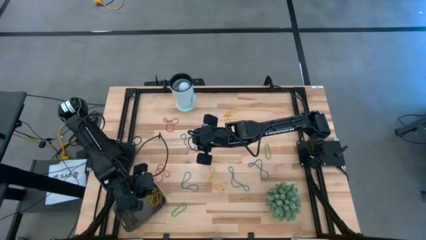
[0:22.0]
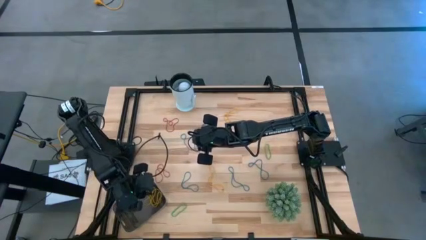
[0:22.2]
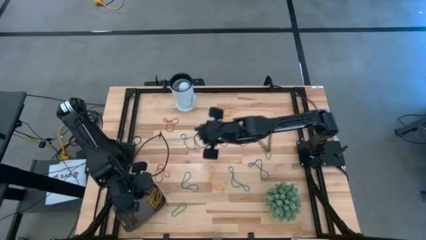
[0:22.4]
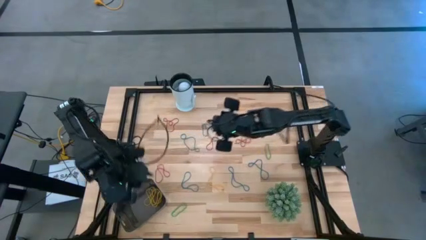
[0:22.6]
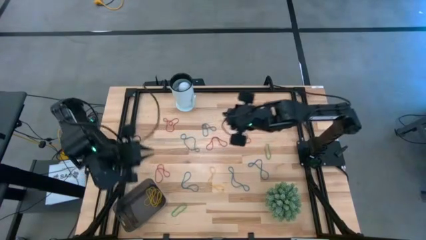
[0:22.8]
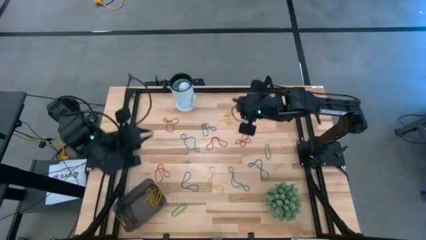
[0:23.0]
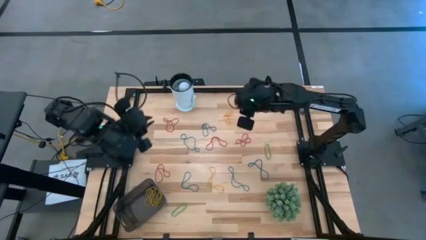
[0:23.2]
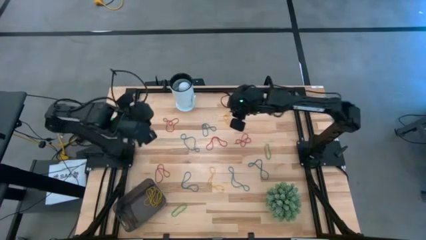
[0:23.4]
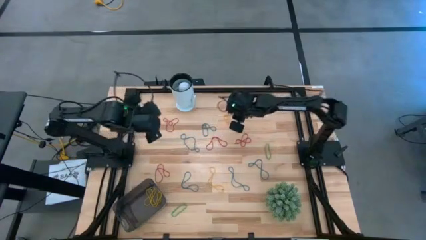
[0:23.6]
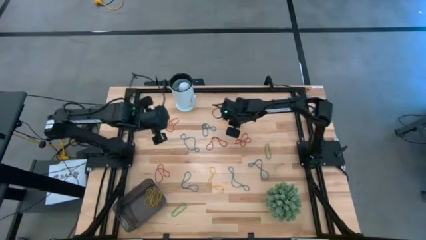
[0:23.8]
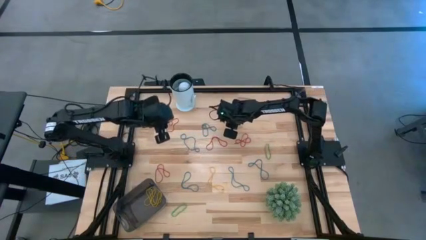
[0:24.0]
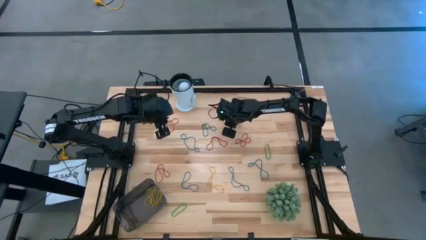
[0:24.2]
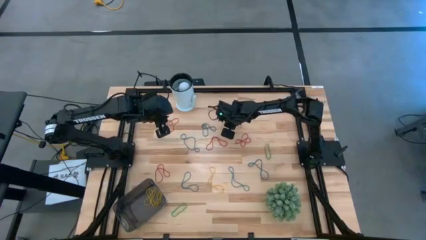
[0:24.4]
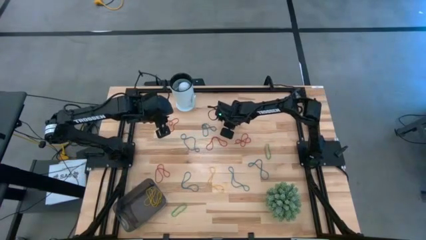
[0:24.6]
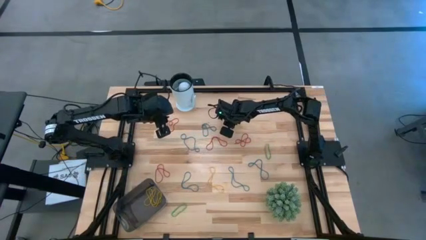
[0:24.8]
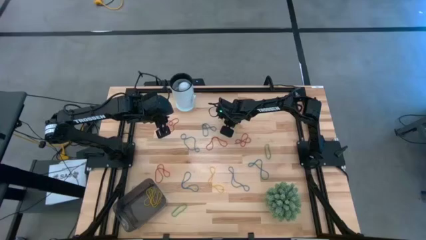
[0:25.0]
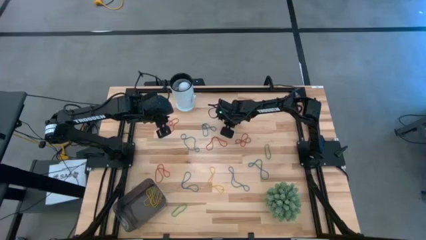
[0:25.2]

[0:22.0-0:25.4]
Task: Pick and place items into bin
Put the yellow rubber band into the black bin

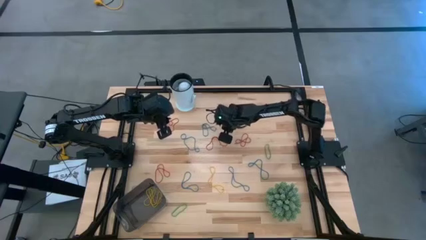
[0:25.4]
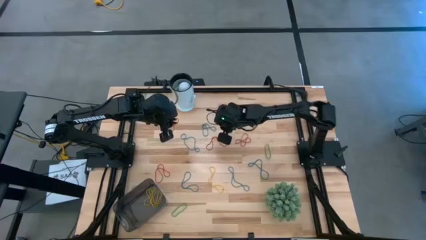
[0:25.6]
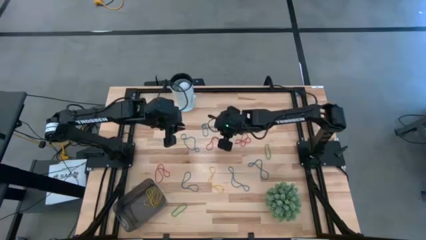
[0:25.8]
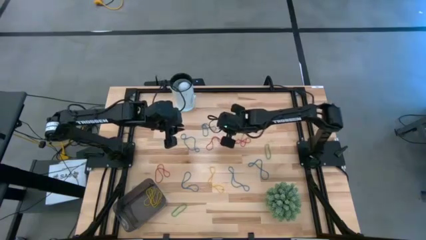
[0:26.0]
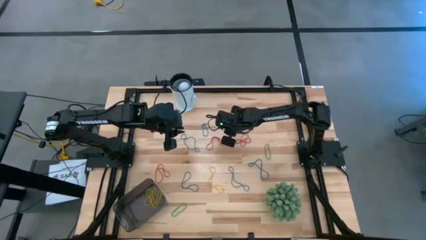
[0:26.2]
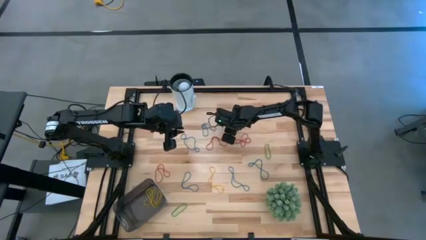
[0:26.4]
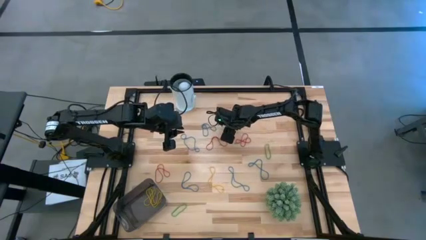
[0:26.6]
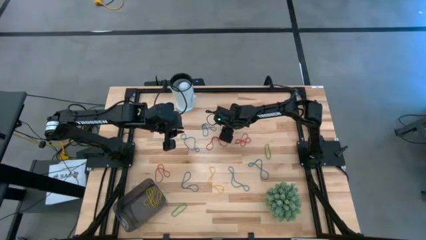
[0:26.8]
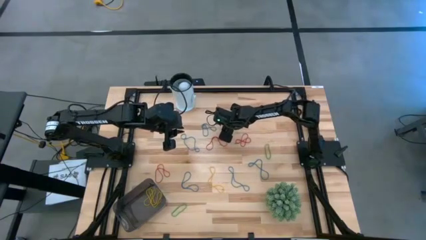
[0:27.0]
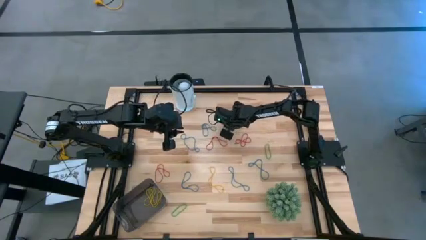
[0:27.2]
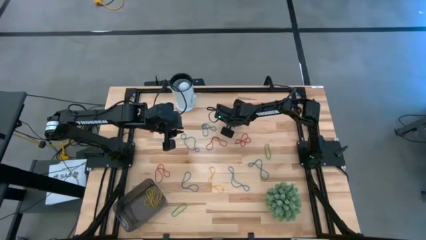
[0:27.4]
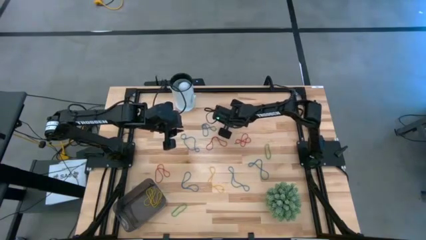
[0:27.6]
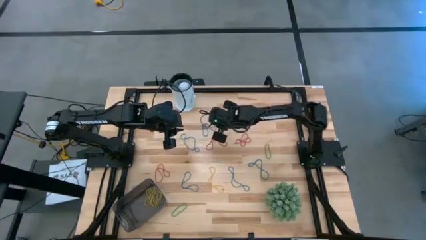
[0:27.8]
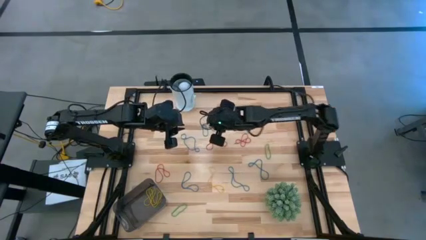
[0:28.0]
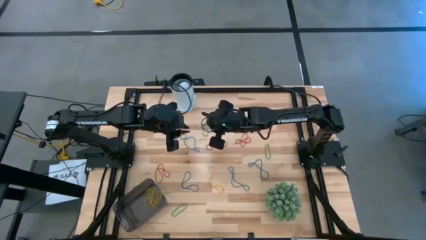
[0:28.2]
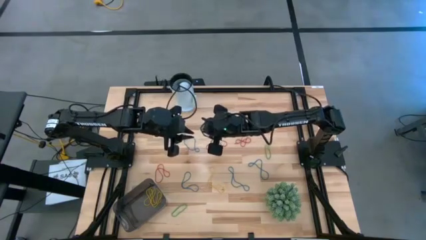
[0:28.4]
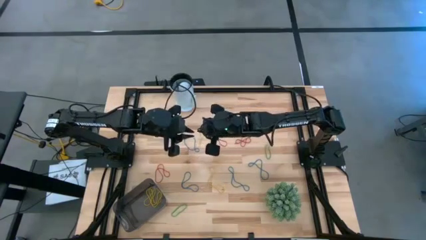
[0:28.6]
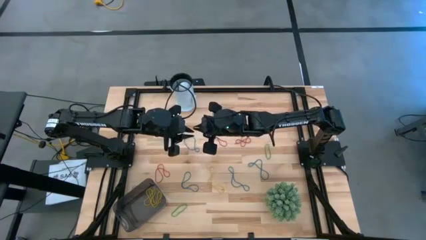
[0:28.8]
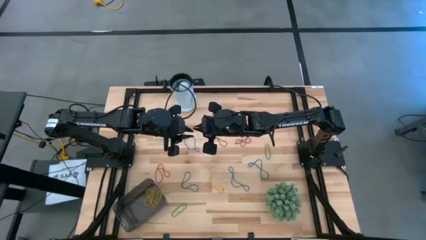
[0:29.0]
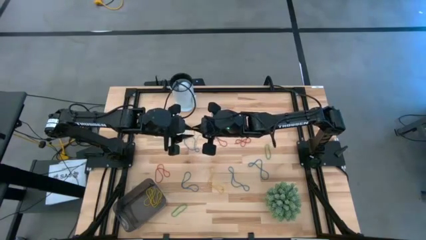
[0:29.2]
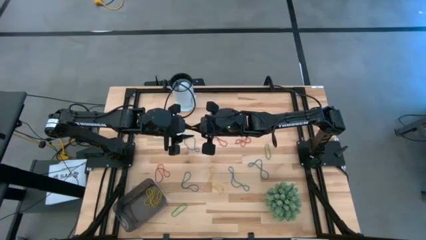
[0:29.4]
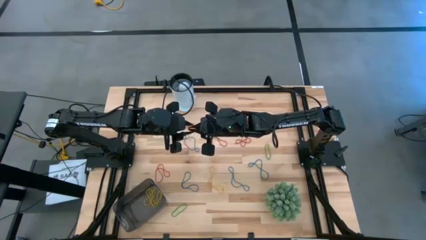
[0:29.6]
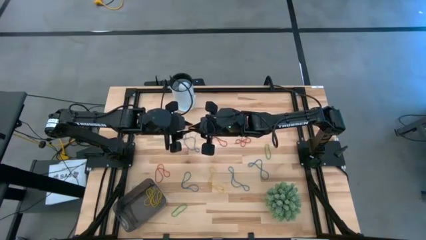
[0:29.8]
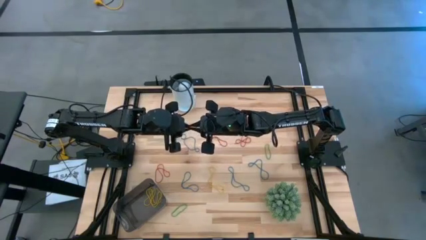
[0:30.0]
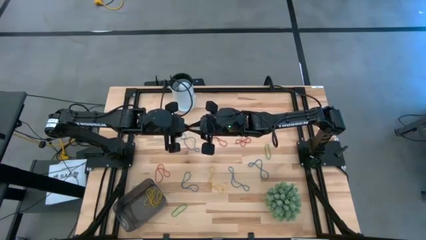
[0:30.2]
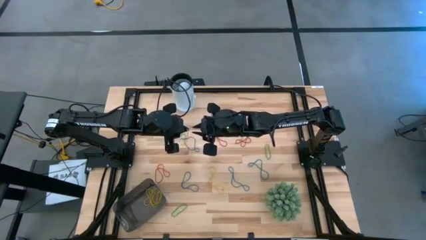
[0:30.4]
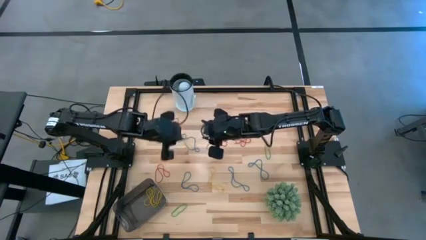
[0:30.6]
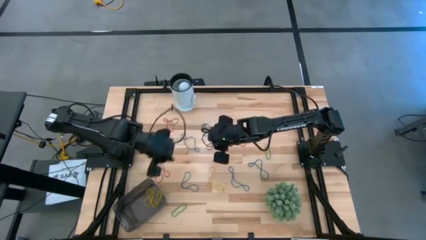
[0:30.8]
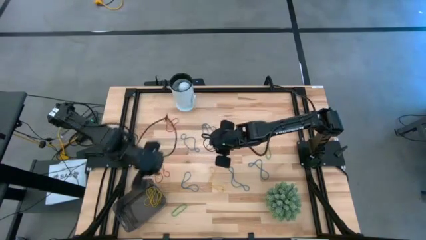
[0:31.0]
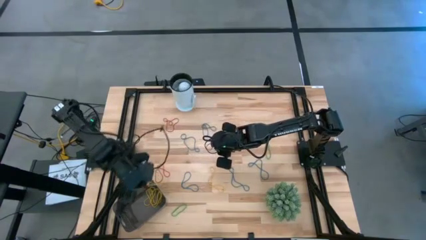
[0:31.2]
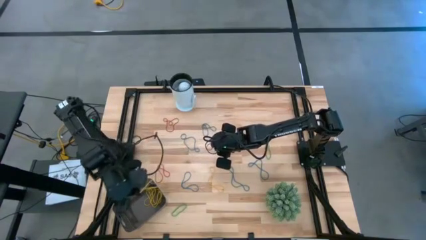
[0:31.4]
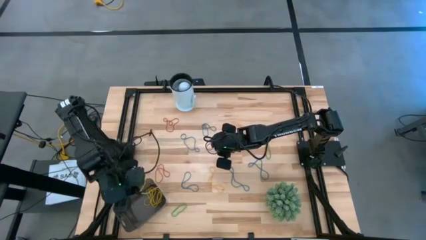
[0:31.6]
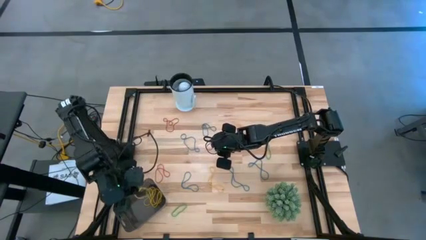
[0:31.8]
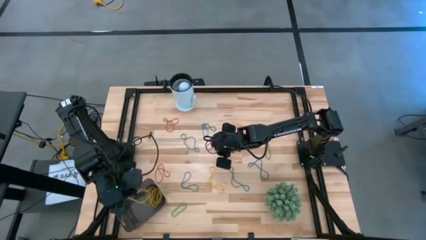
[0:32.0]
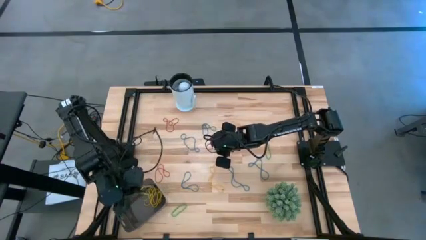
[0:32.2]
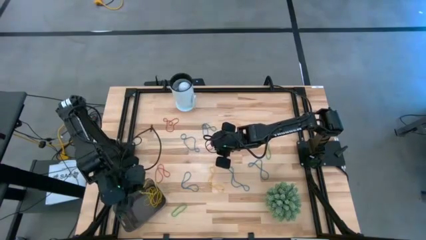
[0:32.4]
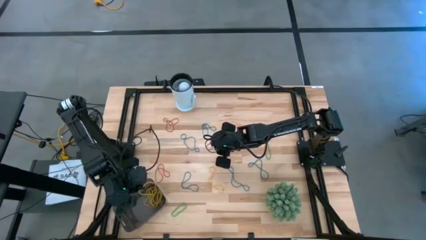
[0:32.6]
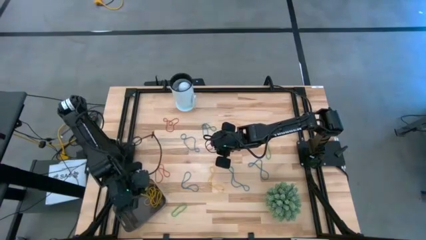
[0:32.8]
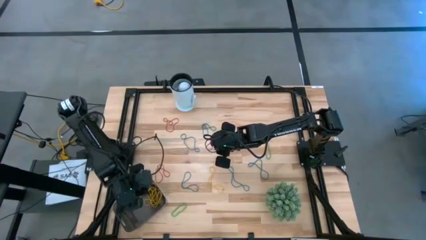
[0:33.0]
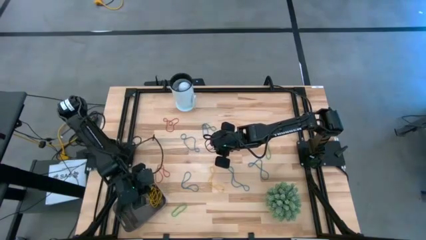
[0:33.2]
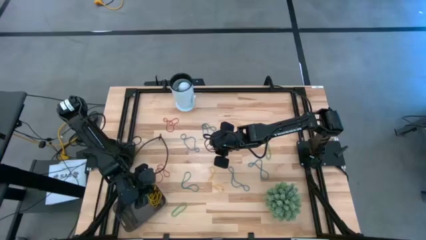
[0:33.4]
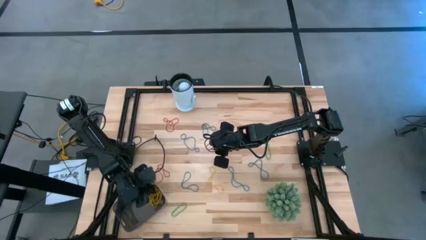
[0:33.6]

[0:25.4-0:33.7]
Put the yellow rubber band into the black bin

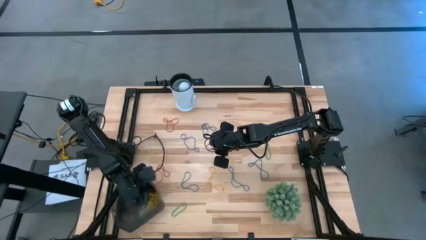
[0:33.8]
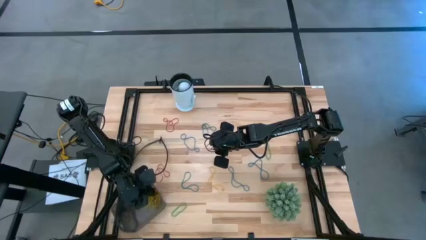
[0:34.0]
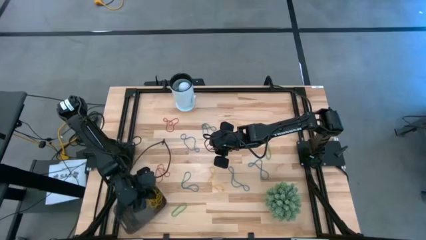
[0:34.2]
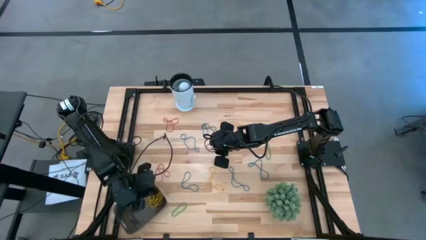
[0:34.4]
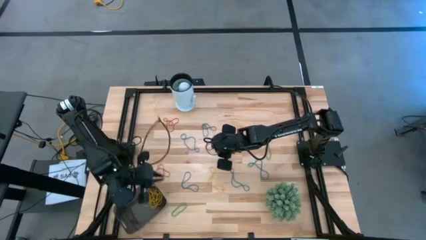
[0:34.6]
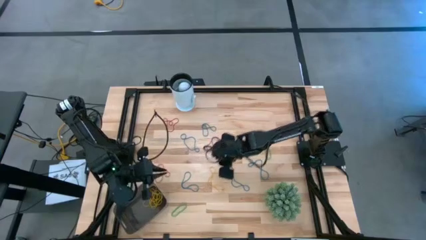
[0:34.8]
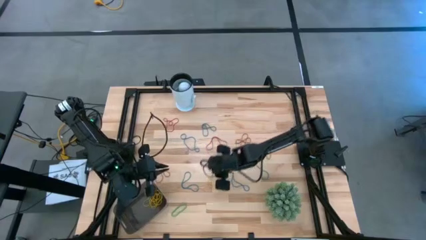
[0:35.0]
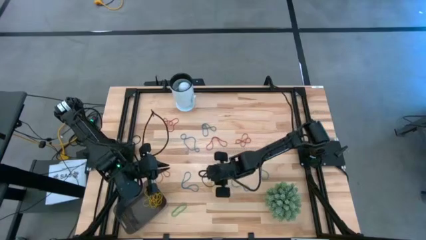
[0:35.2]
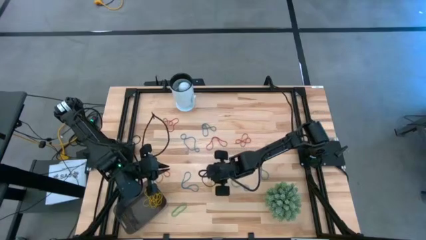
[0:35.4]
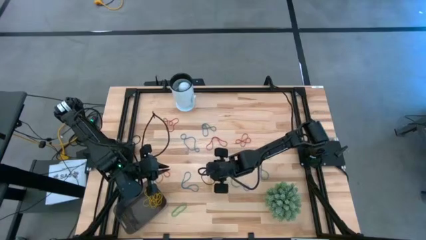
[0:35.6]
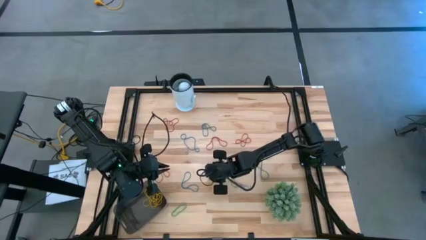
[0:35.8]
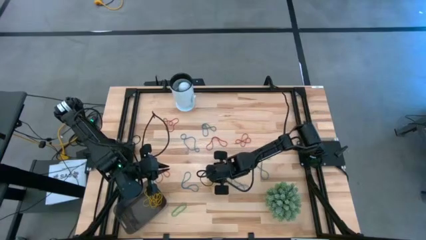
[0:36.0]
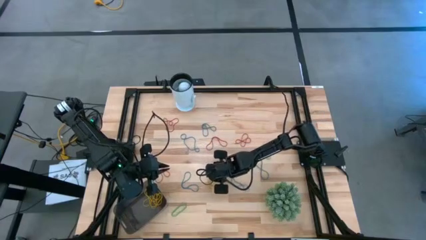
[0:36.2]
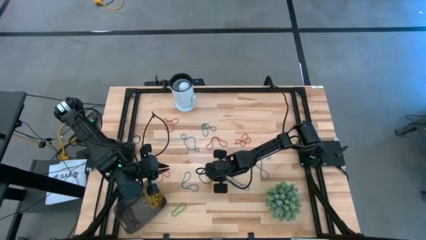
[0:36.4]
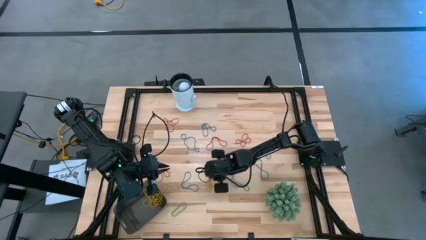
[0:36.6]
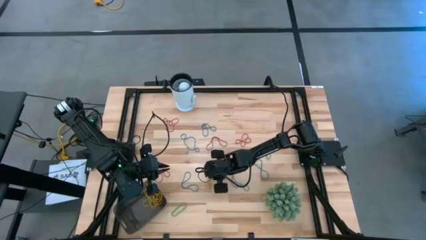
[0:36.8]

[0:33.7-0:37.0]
Put the yellow rubber band into the black bin

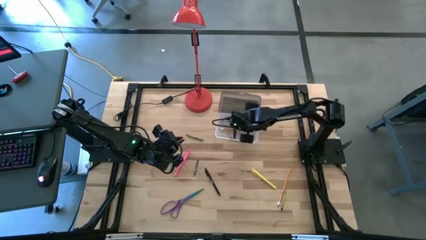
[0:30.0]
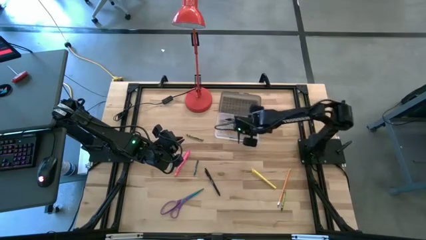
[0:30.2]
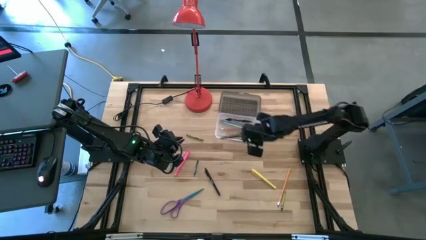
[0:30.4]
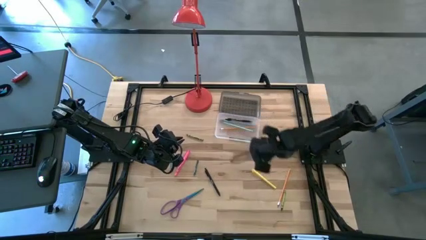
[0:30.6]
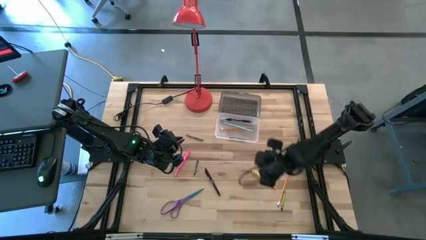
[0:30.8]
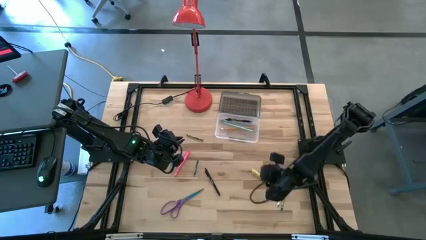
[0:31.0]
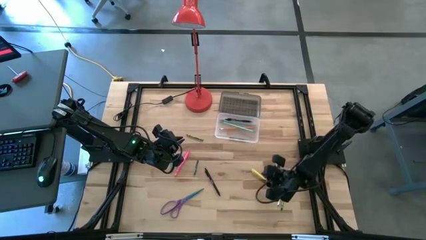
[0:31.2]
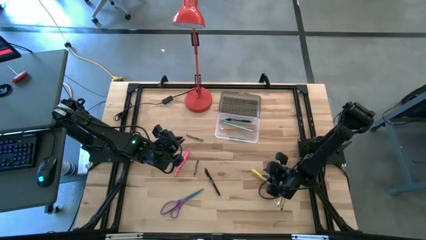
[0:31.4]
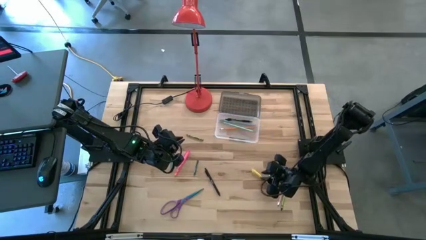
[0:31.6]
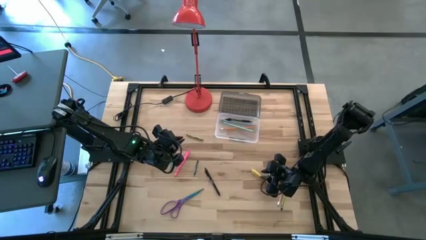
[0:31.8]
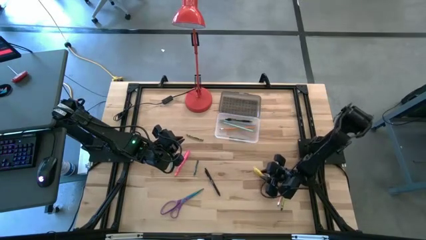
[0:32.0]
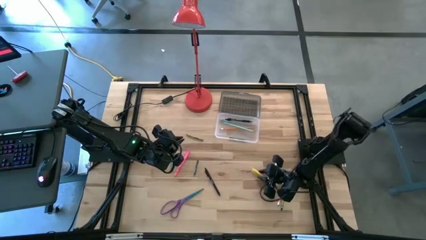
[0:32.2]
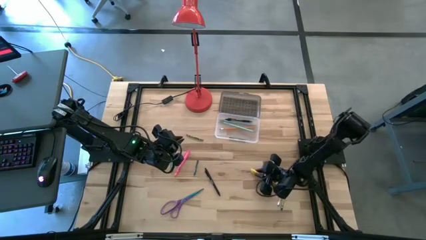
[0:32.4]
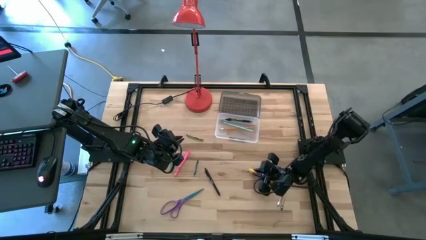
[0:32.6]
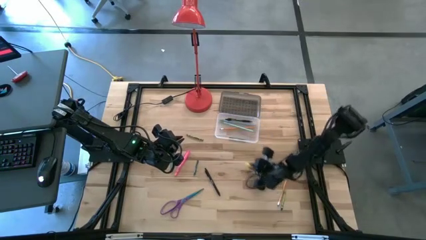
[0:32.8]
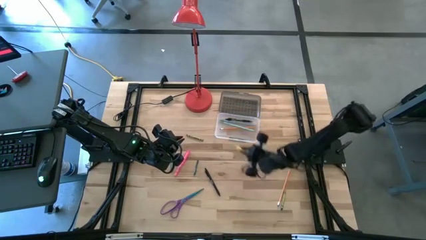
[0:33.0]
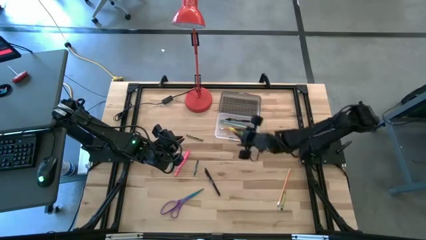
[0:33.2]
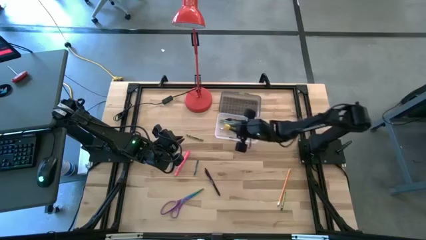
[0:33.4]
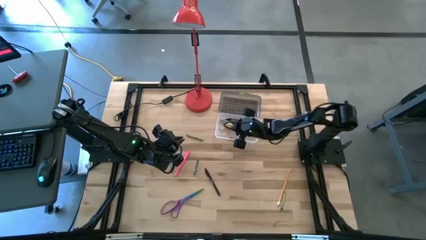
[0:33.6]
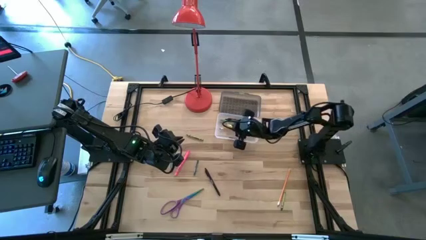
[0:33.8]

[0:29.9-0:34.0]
Task: Pick & place school supplies into a supply box
Put the yellow pen into the black supply box
